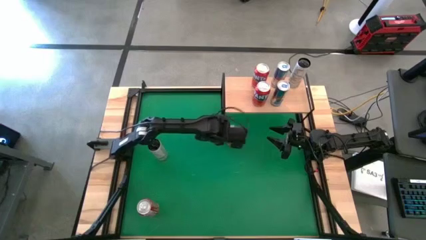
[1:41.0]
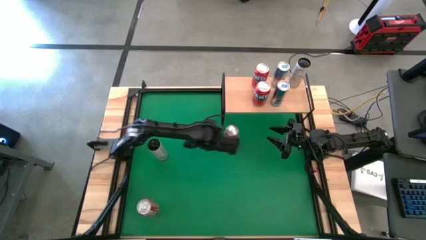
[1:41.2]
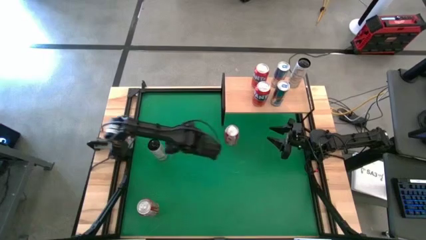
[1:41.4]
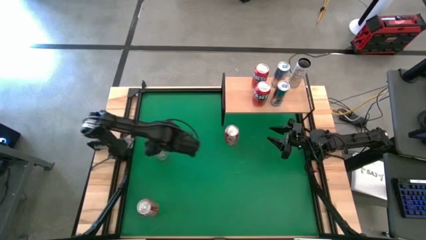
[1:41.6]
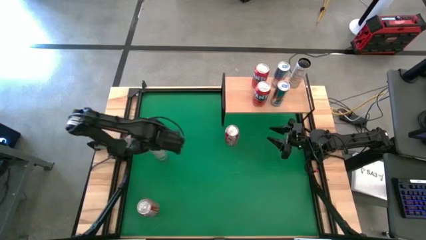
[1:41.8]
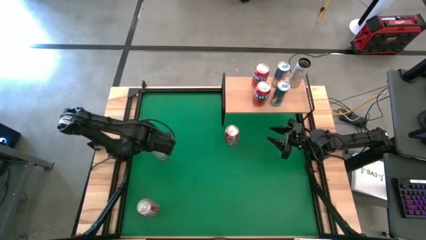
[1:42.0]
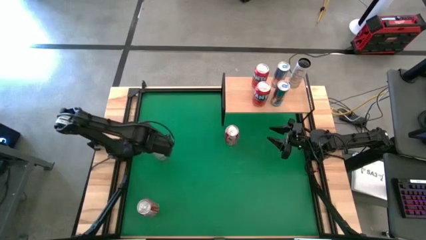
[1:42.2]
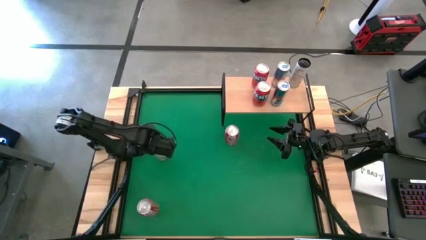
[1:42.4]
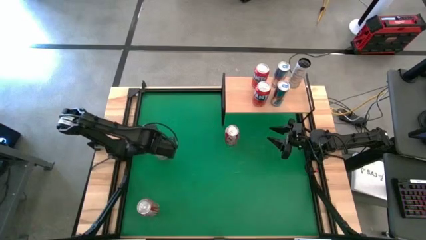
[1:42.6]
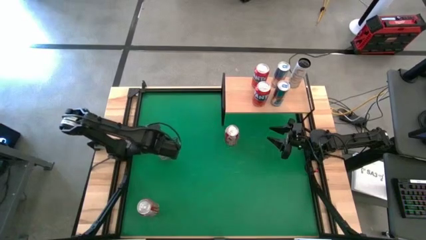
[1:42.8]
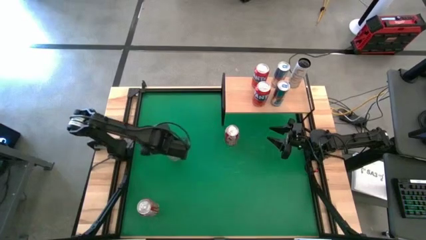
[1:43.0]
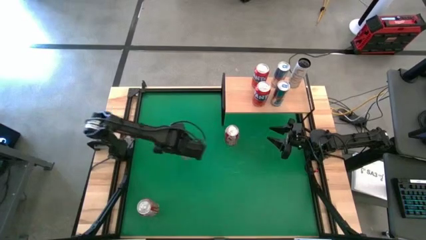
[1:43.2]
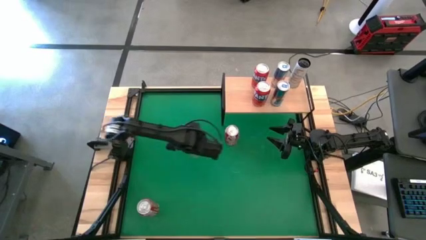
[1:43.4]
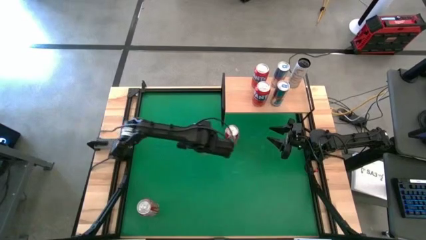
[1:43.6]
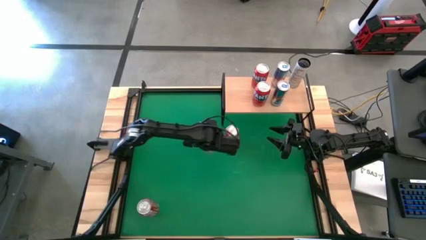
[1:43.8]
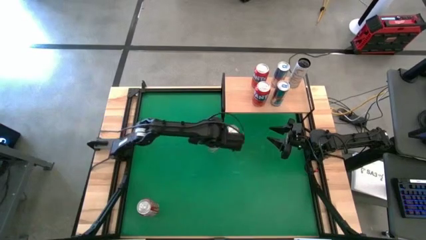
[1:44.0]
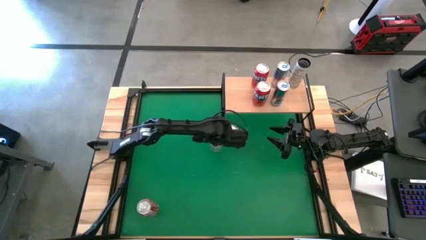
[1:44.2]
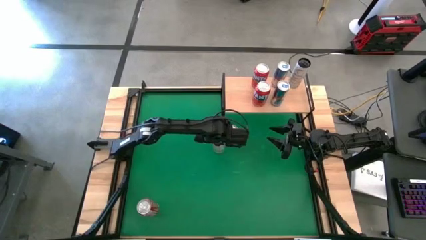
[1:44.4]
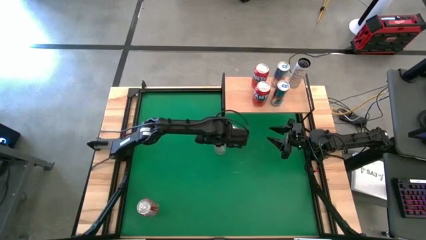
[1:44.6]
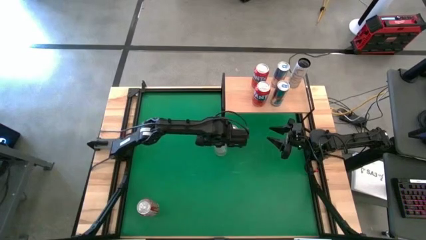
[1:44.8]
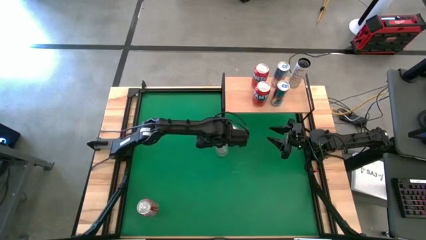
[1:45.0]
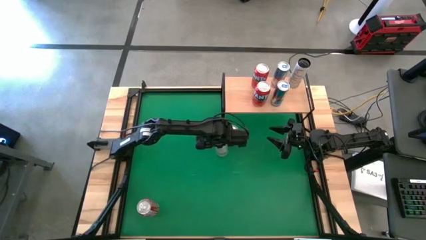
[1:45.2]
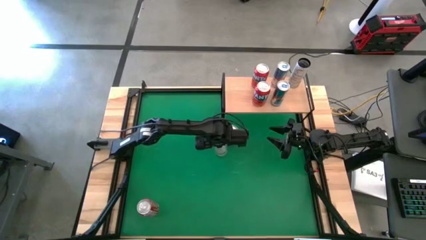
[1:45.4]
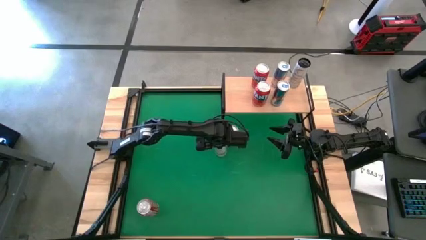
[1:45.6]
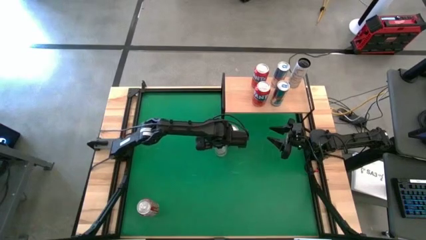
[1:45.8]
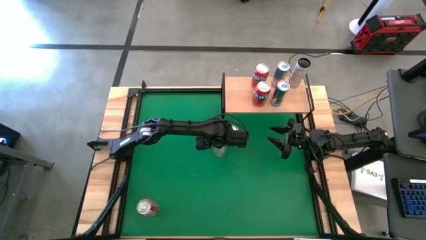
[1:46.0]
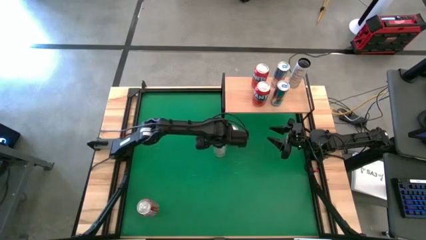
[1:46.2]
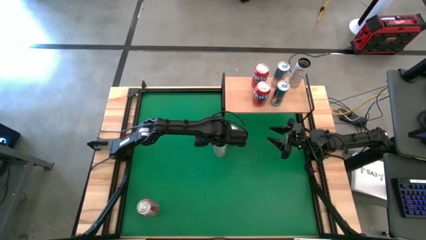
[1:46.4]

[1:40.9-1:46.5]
Task: Place canned beverage on shelf
Move the white yellow soda can to the center of the table

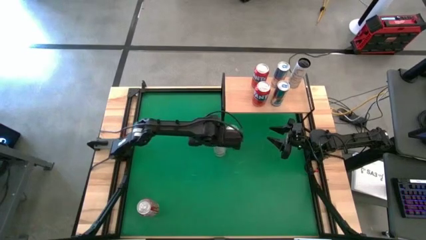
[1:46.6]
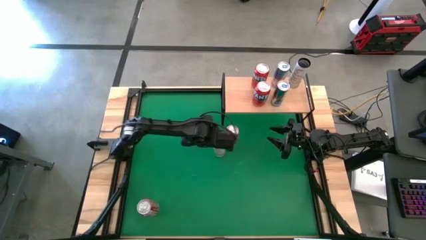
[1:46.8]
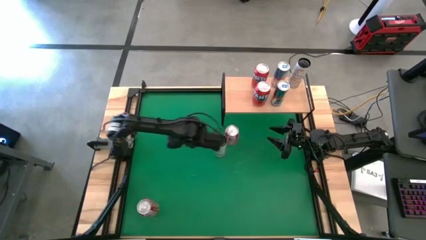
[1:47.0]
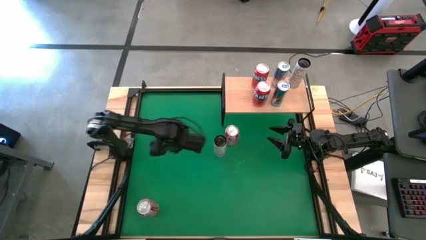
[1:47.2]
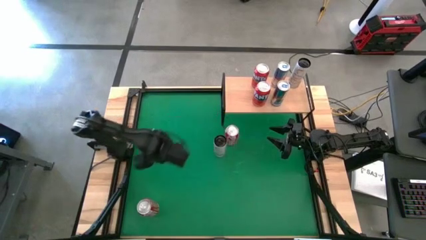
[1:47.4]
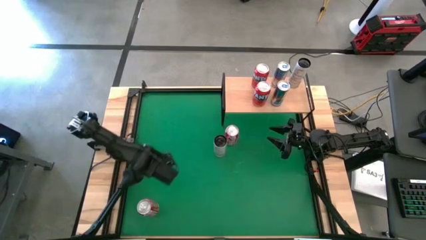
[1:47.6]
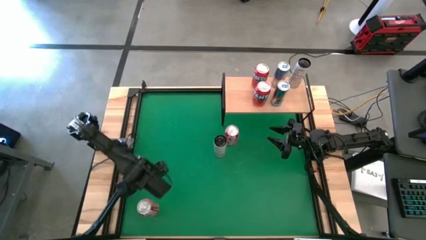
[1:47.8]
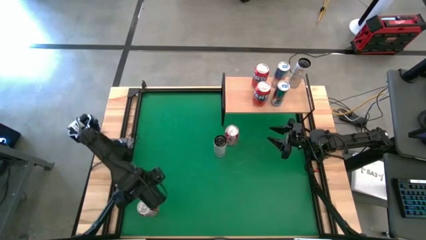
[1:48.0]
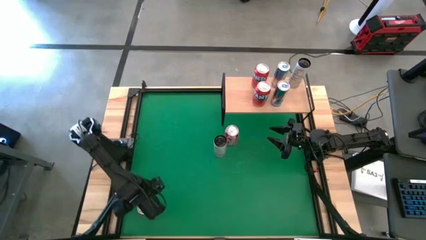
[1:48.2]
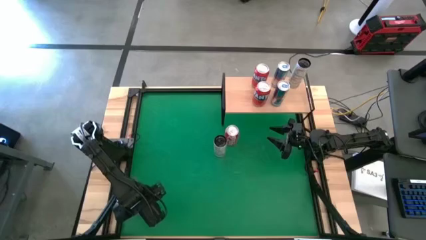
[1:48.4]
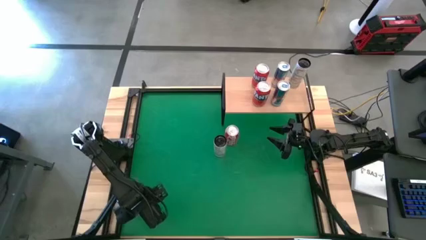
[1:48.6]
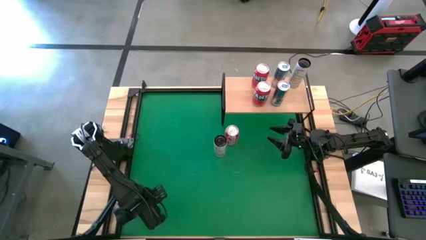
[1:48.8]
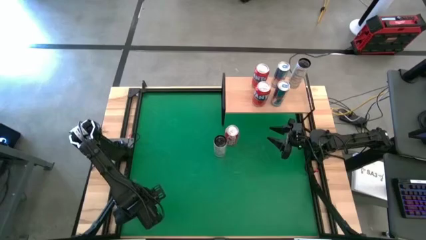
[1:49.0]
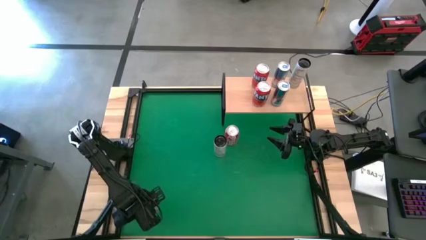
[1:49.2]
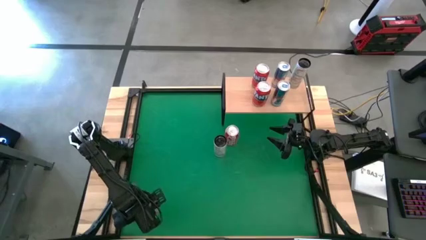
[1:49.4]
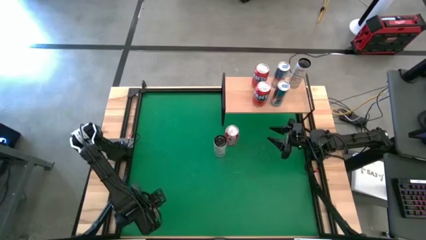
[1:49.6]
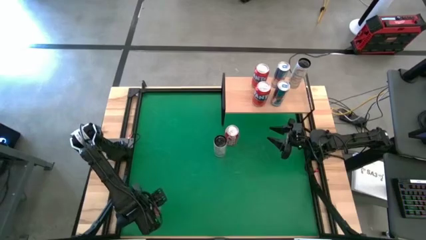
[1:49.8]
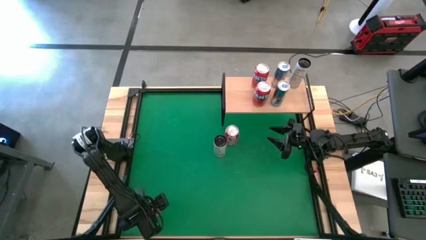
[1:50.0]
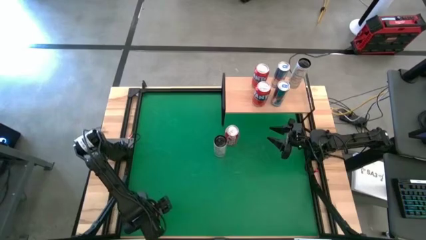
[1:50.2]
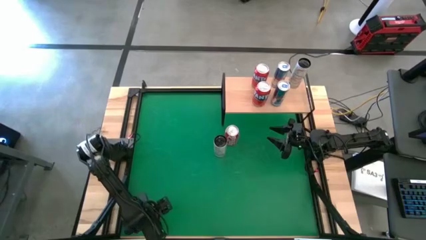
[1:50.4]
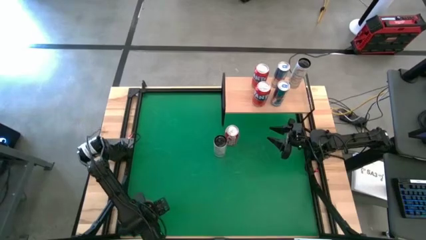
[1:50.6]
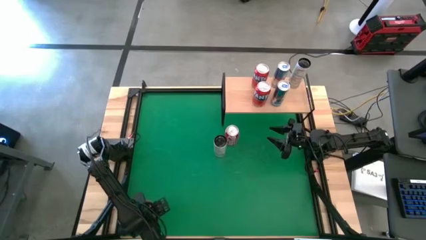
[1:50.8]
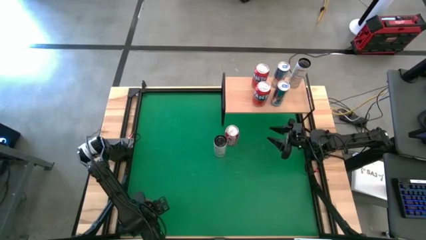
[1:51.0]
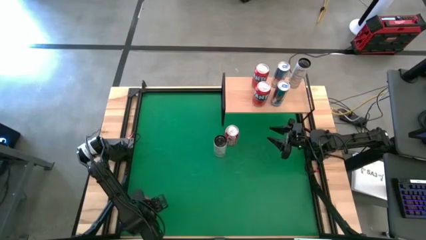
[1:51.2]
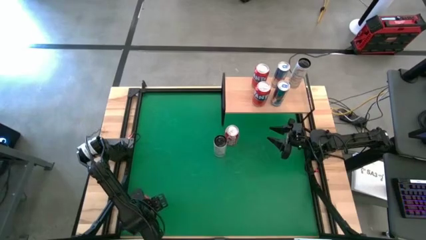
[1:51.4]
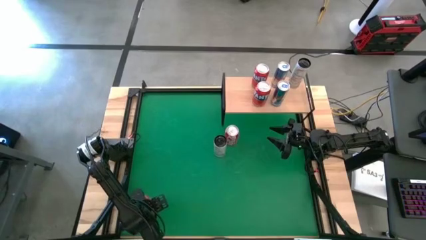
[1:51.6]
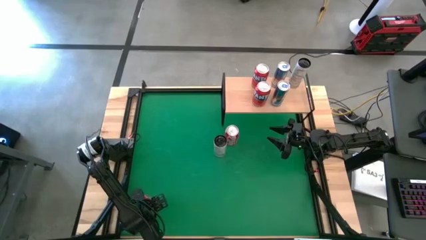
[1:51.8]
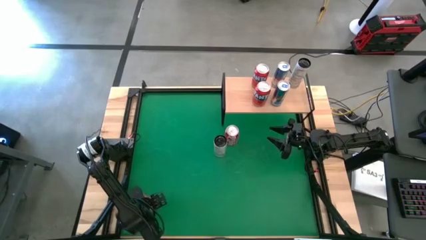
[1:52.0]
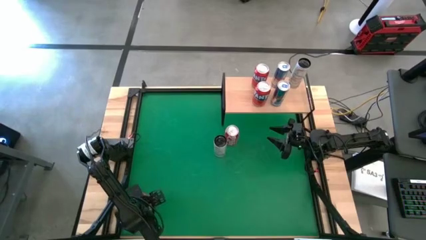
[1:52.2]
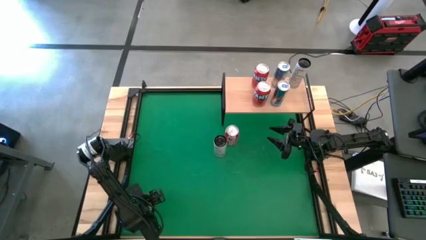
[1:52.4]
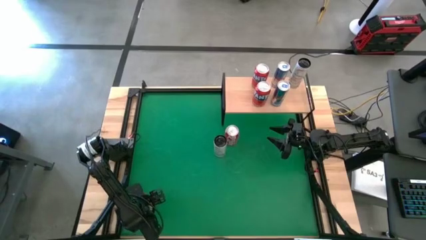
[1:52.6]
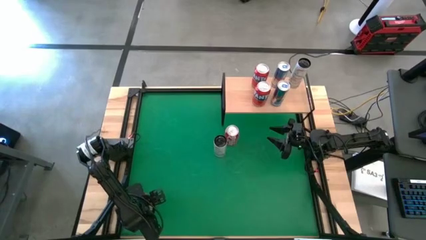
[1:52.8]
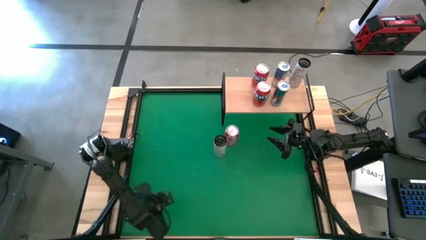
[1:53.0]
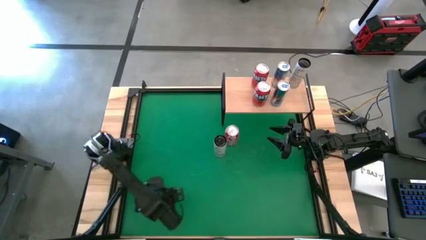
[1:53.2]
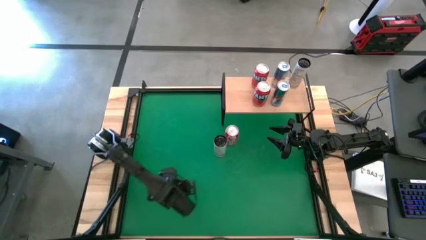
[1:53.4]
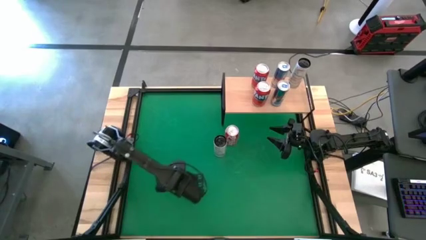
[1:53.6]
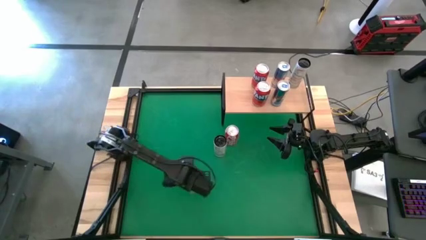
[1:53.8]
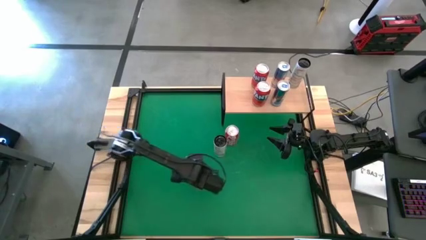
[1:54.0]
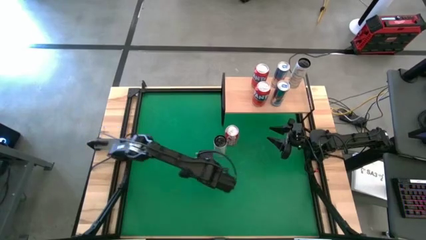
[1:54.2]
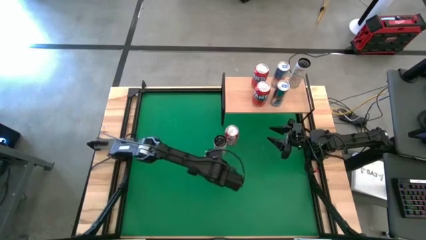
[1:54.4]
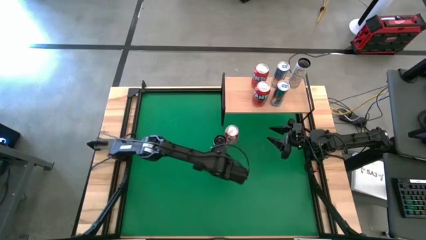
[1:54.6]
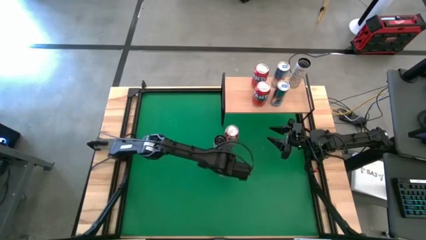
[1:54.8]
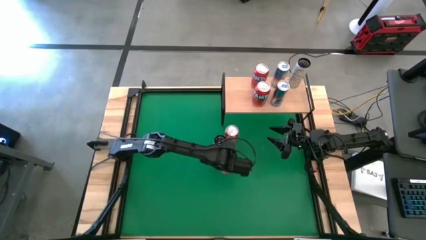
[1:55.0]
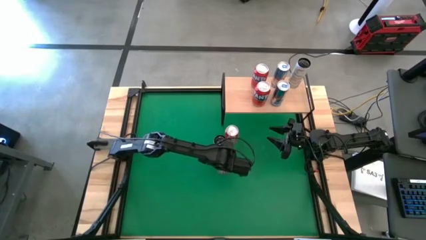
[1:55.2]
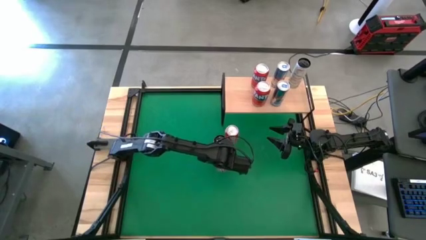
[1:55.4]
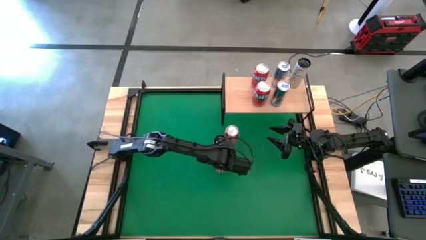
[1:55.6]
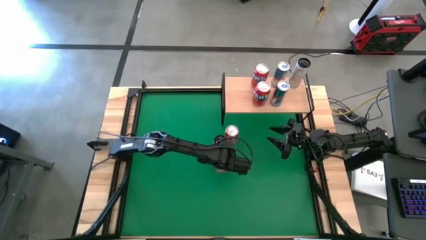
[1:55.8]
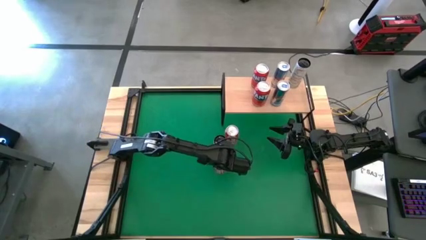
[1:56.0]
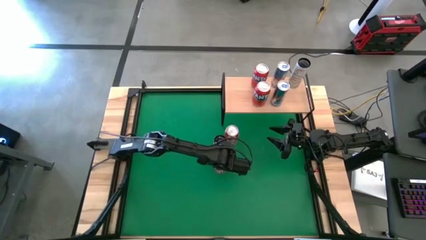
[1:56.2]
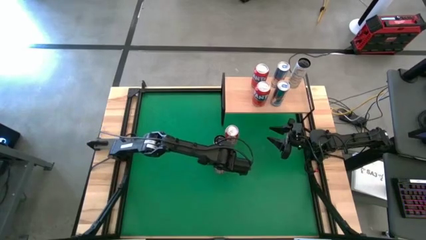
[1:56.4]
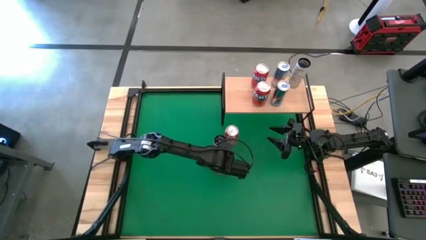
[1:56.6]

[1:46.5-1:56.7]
Move the bottom red white soda can to the center of the table
